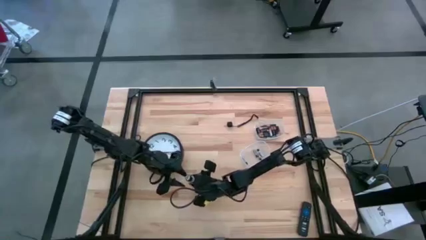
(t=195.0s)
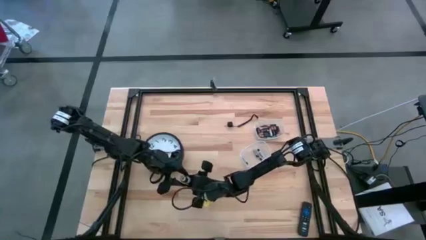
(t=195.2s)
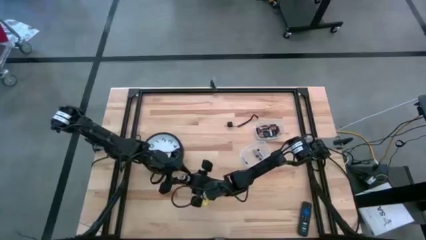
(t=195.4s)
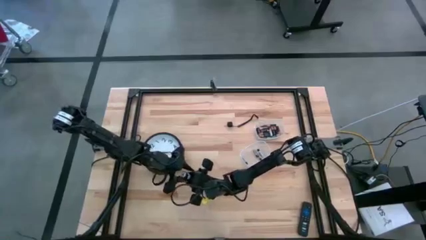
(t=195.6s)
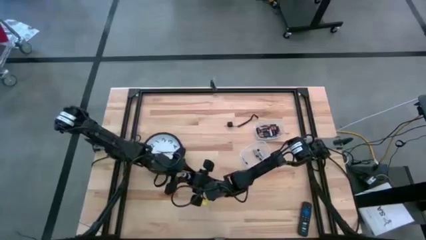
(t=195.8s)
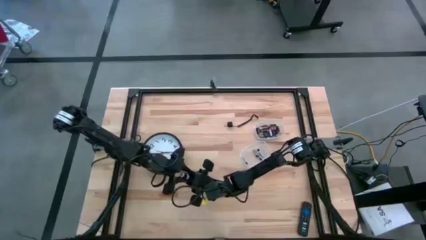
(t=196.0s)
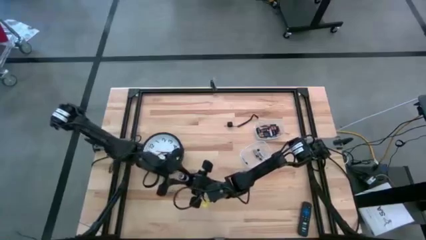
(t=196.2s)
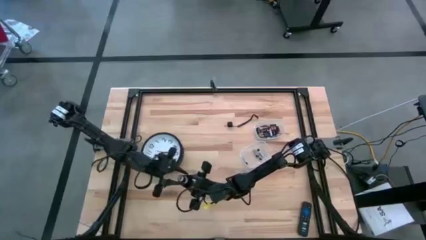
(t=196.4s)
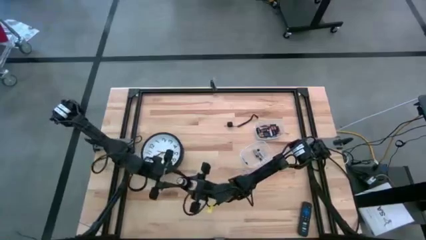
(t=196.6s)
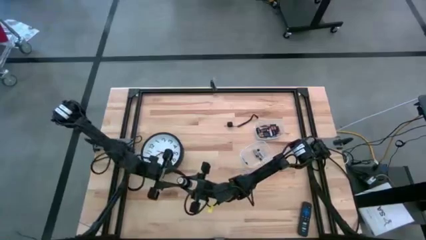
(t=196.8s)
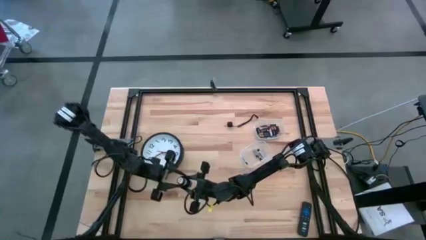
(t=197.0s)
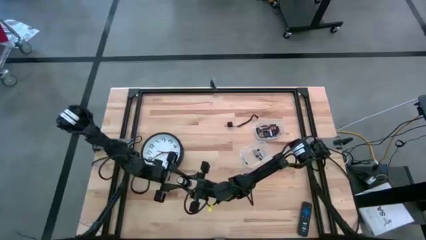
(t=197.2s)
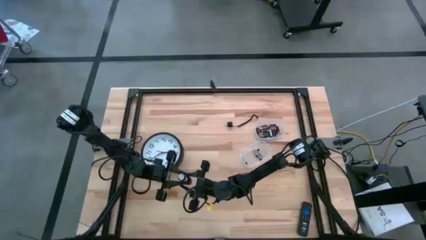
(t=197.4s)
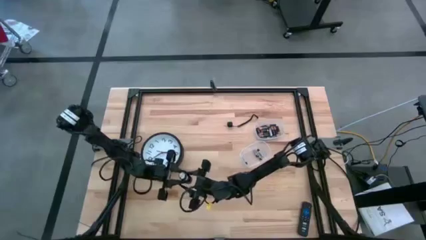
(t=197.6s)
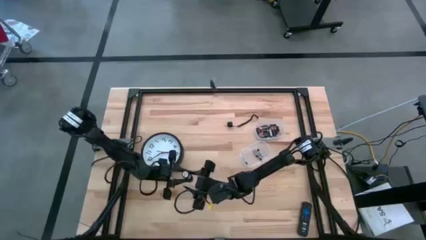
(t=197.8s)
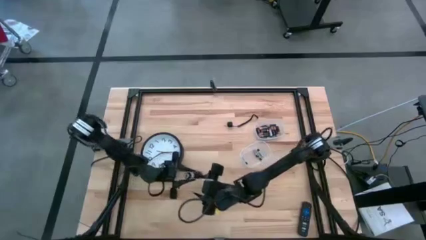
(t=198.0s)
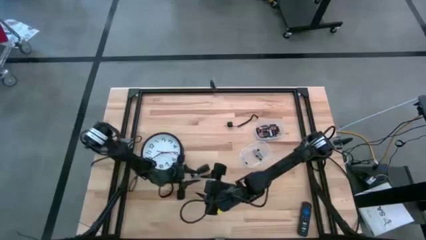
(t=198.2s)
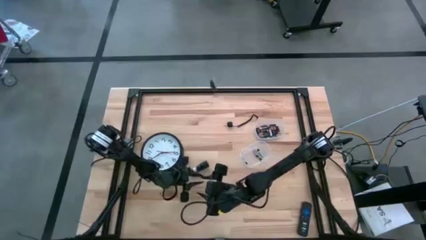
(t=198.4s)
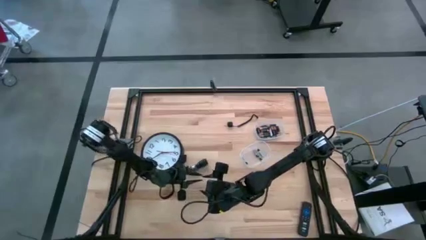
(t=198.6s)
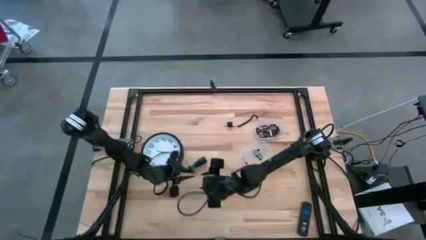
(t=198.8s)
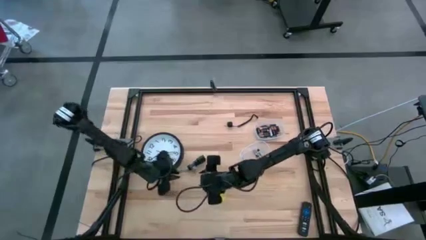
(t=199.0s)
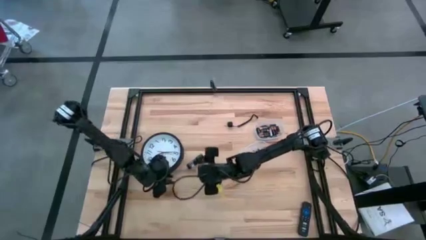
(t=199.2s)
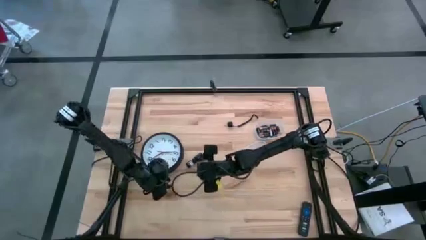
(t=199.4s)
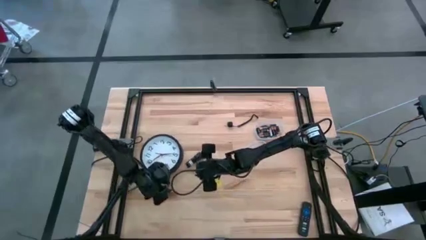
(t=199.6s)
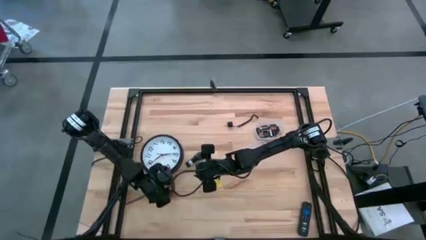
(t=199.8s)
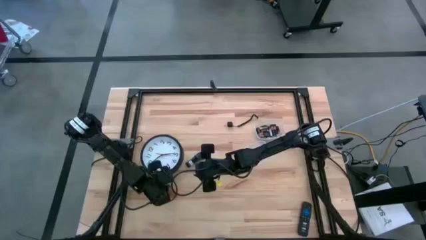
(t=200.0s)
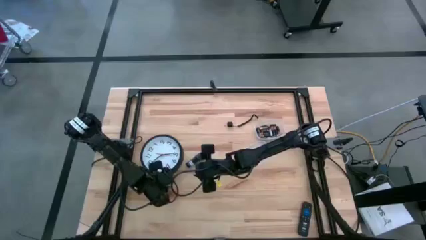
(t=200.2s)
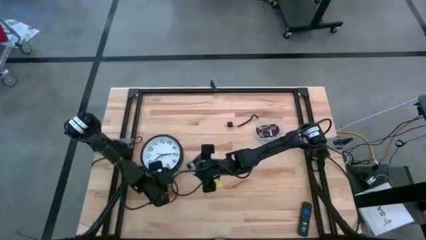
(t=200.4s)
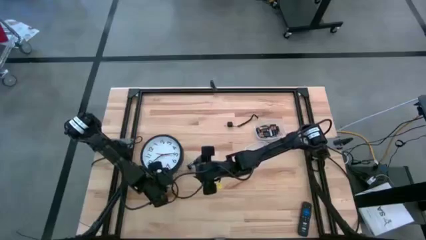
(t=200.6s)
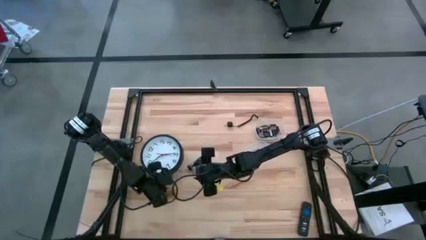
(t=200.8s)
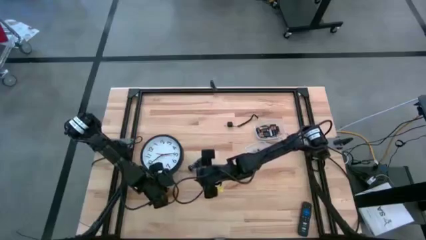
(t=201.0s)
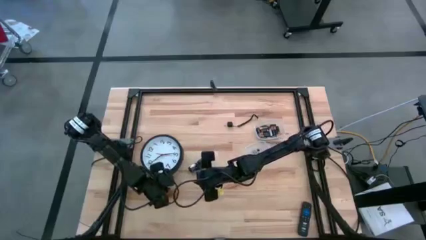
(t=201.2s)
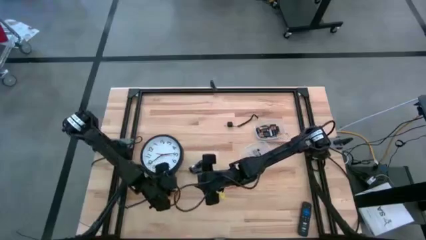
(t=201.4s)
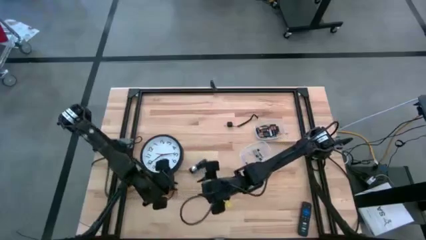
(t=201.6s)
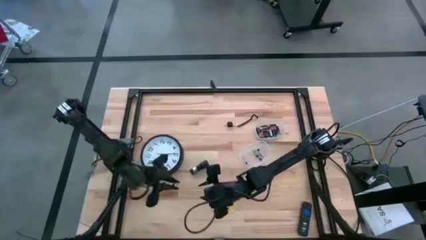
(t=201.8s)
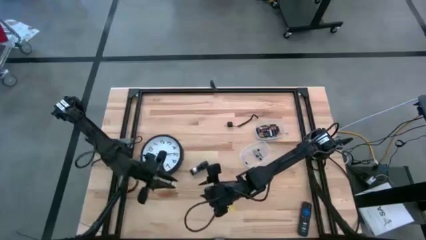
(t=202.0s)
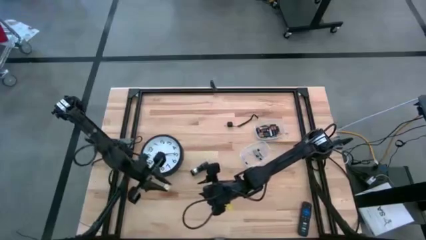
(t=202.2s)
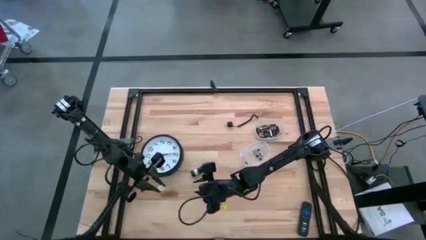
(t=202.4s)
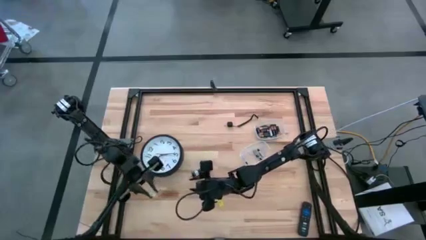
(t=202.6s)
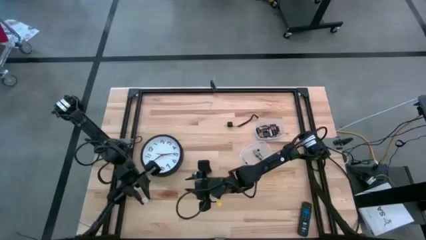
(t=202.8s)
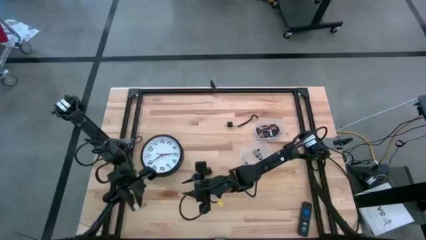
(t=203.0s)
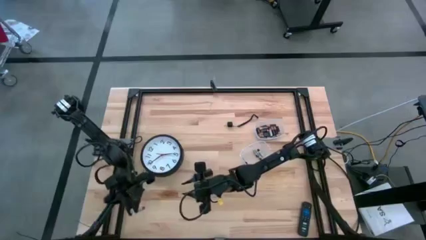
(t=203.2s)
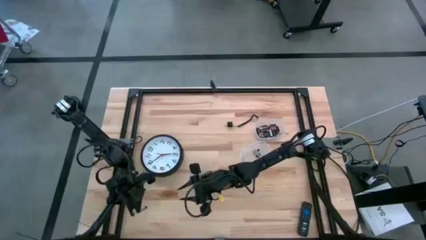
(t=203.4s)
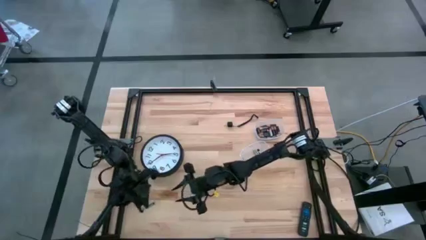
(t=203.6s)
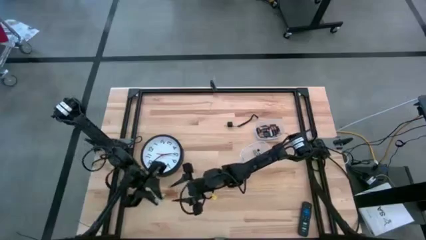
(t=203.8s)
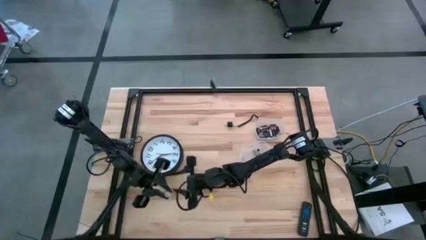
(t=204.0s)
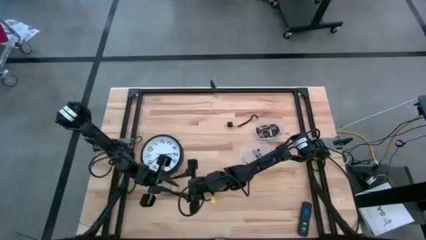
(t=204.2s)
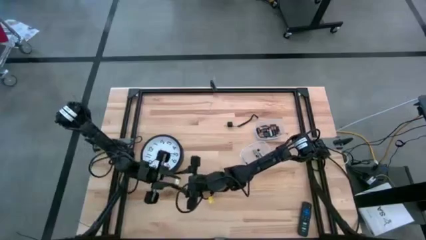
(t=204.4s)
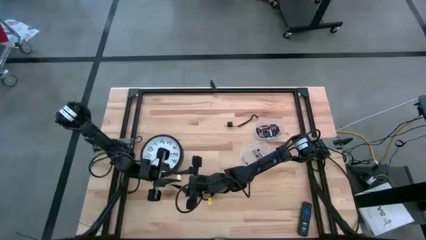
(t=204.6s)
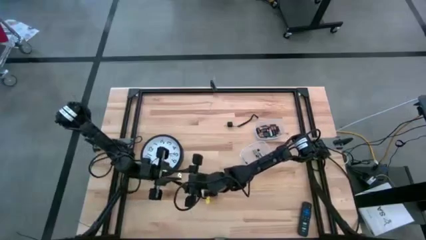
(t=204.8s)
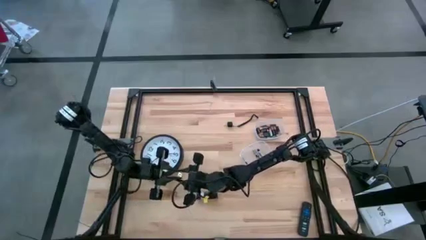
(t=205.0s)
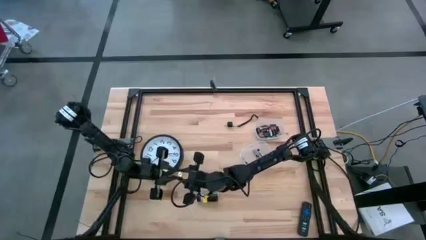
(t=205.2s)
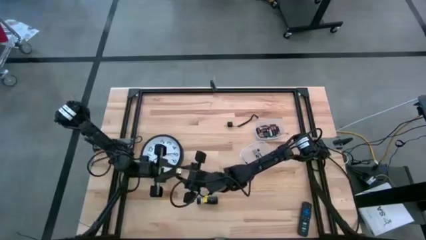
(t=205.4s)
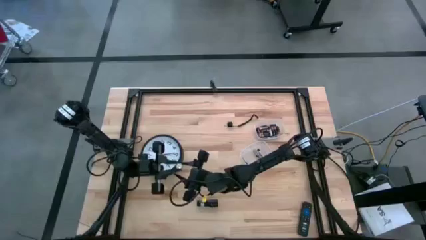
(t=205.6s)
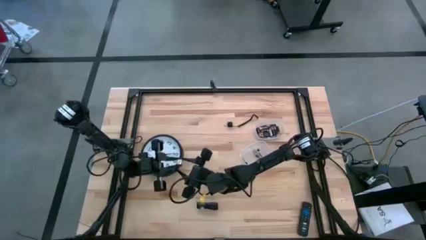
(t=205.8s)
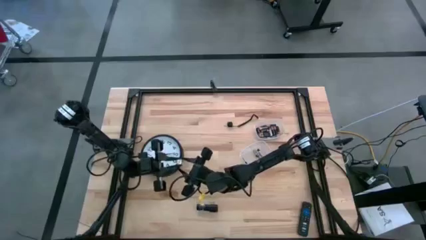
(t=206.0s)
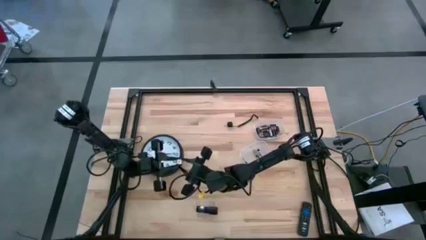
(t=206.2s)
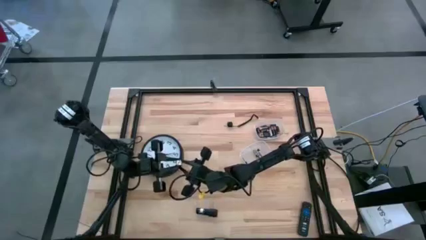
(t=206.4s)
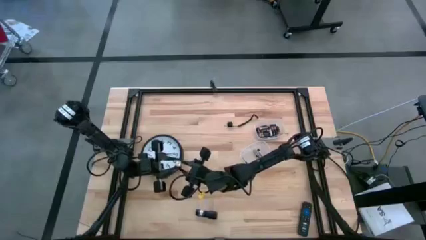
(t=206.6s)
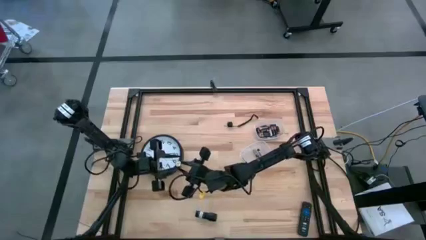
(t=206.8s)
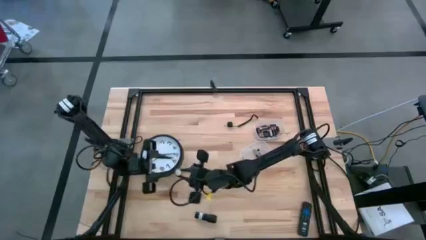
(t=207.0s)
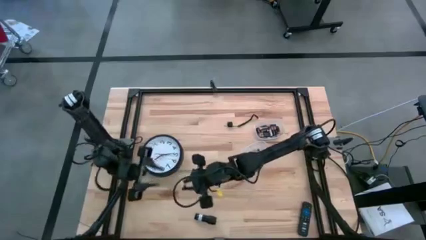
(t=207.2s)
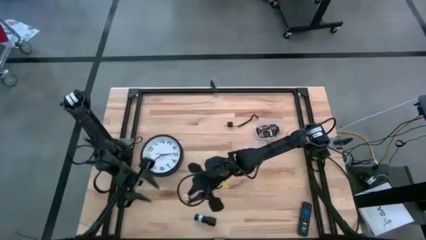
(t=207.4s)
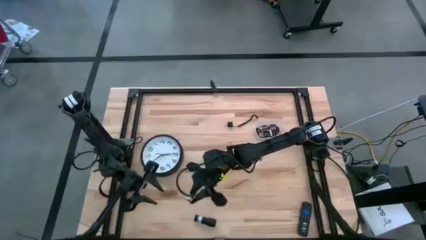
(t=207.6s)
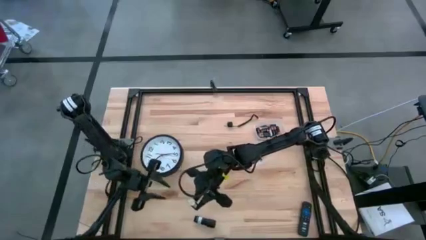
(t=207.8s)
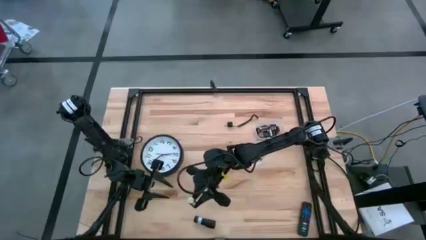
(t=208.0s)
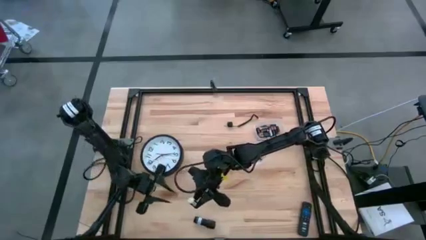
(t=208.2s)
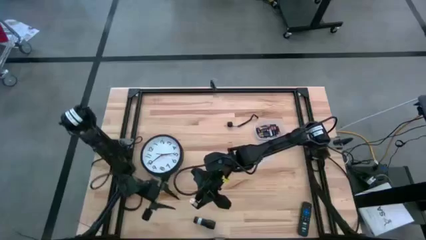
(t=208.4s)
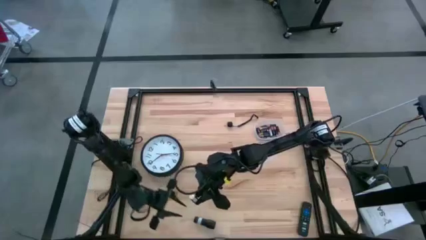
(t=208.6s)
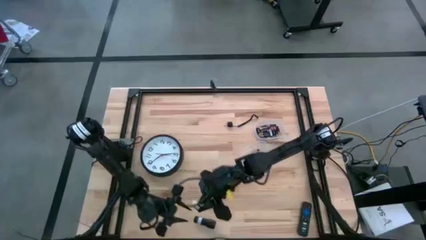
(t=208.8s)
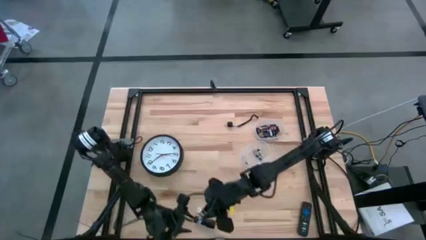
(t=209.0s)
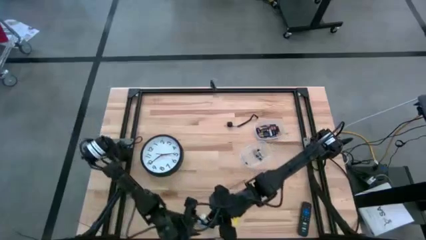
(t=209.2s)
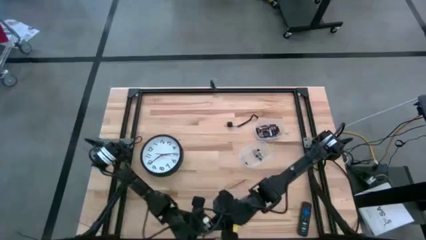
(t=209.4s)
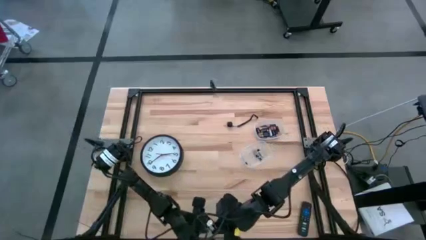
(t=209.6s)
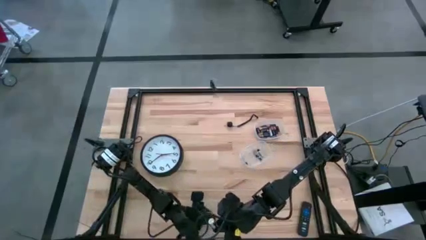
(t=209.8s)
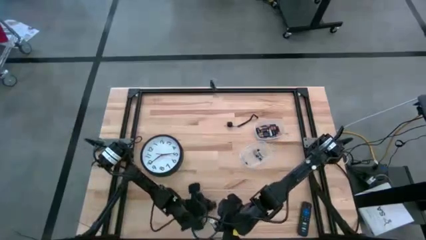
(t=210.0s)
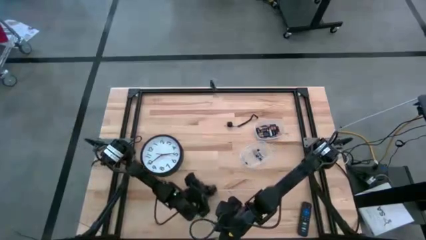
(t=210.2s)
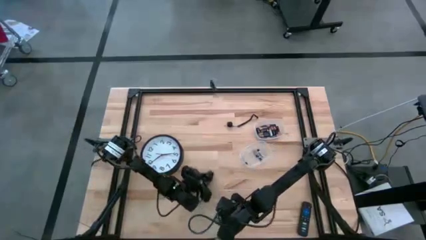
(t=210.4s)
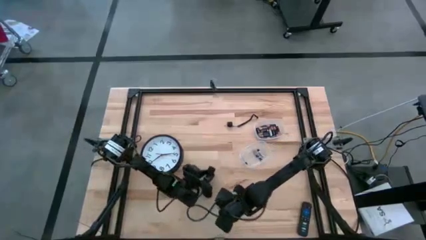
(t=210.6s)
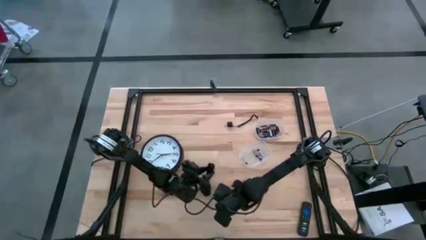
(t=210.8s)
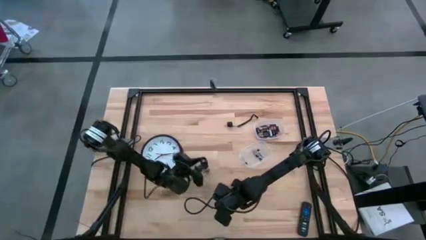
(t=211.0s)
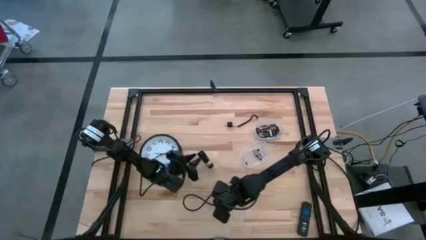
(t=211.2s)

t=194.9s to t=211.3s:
Task: Insert battery
Insert the white battery holder into the white flashlight compartment
